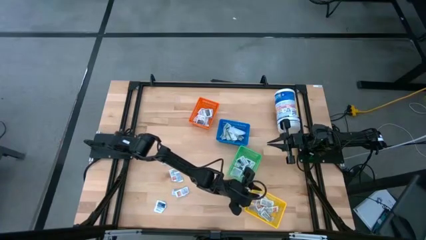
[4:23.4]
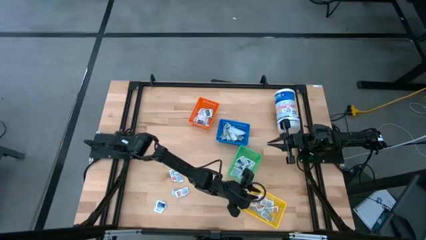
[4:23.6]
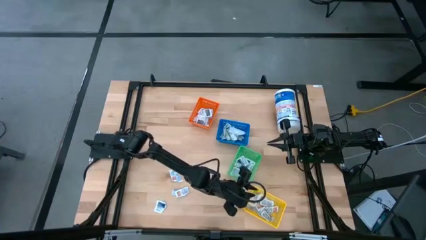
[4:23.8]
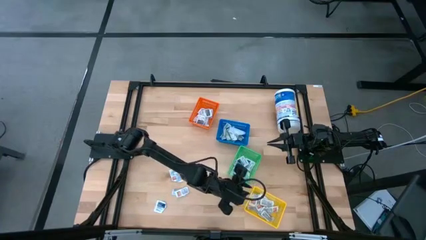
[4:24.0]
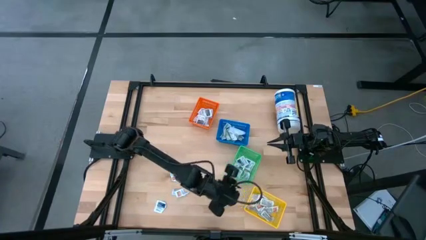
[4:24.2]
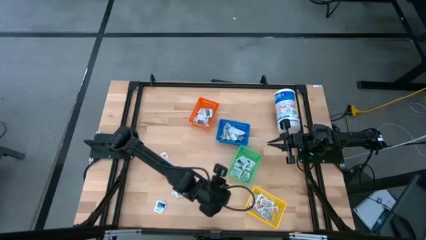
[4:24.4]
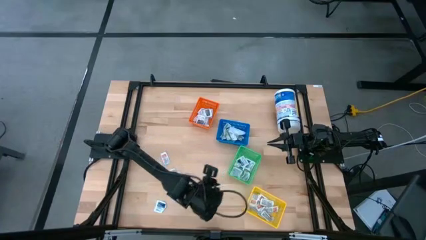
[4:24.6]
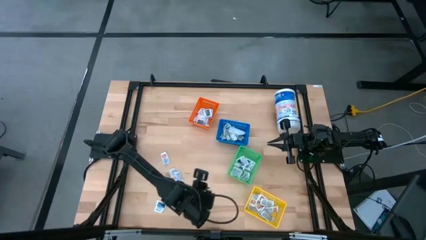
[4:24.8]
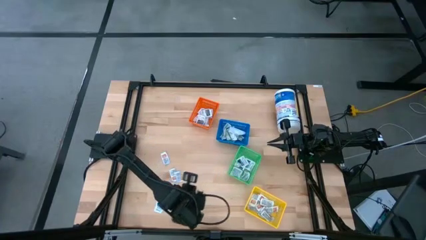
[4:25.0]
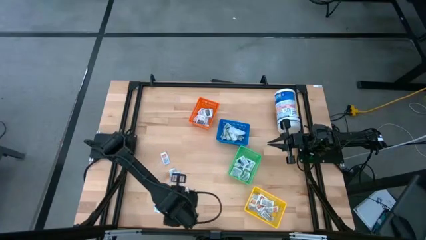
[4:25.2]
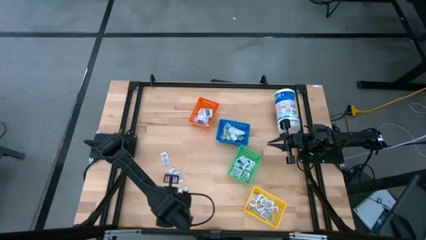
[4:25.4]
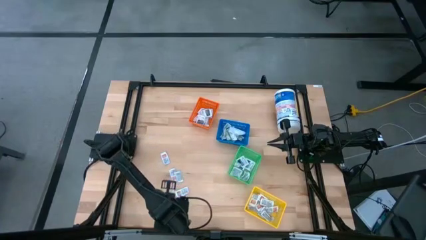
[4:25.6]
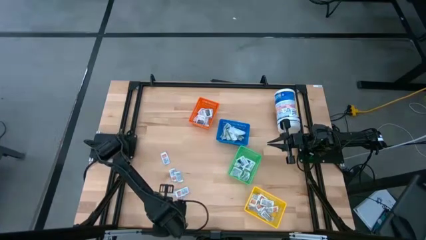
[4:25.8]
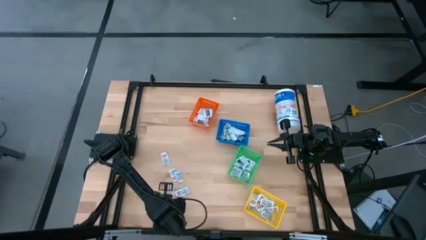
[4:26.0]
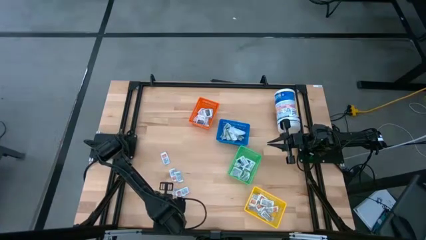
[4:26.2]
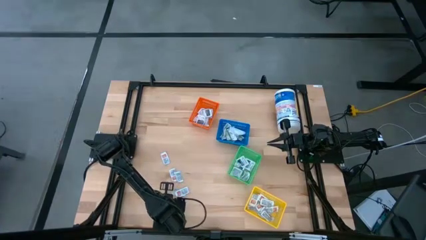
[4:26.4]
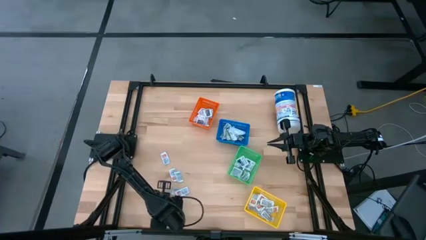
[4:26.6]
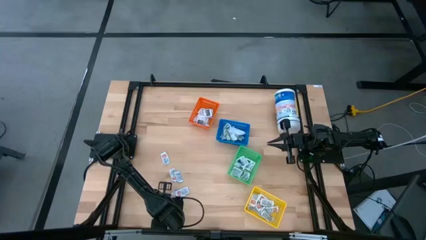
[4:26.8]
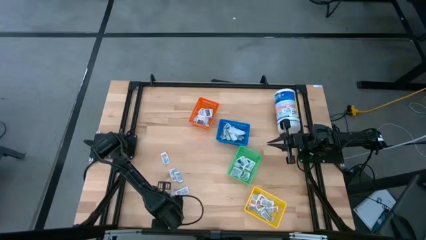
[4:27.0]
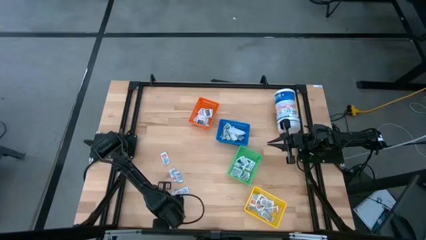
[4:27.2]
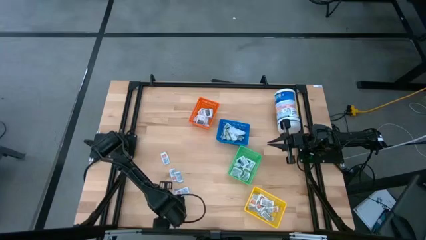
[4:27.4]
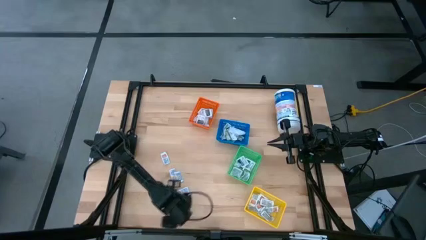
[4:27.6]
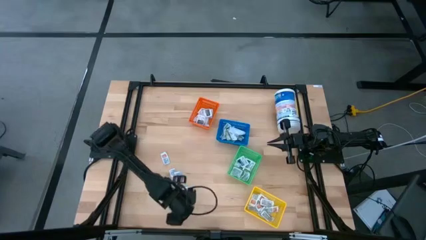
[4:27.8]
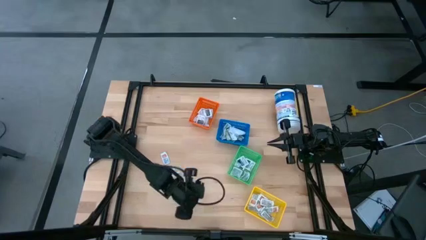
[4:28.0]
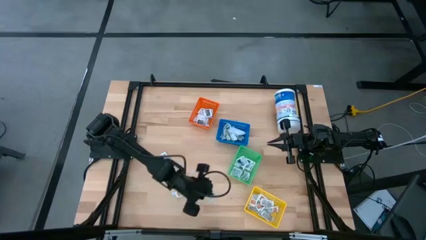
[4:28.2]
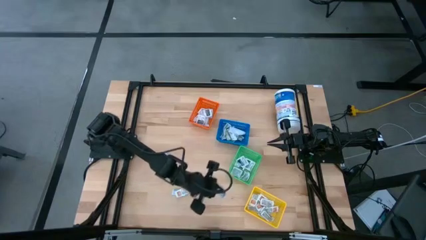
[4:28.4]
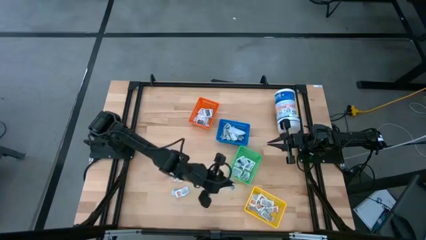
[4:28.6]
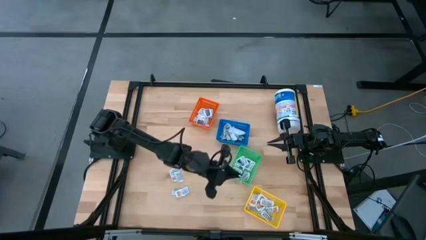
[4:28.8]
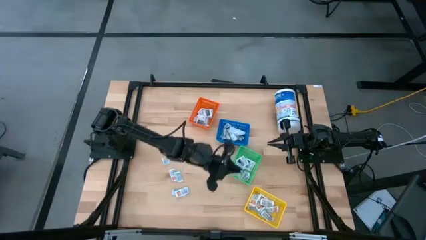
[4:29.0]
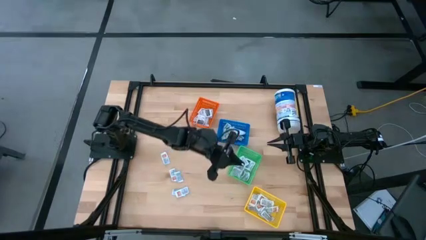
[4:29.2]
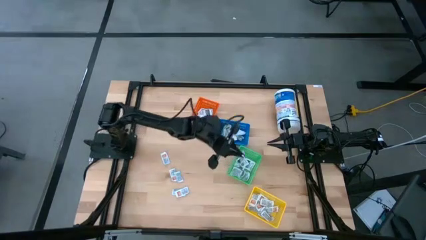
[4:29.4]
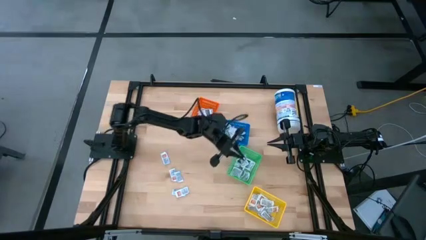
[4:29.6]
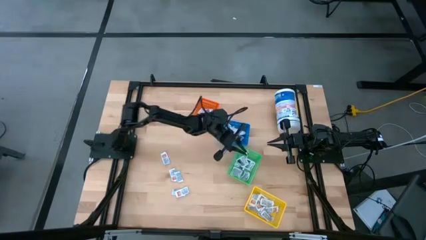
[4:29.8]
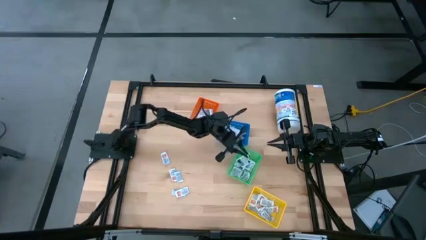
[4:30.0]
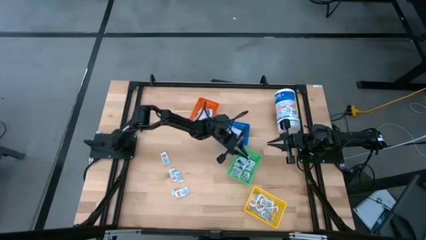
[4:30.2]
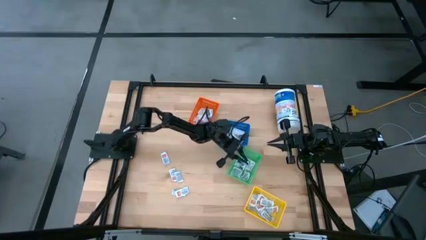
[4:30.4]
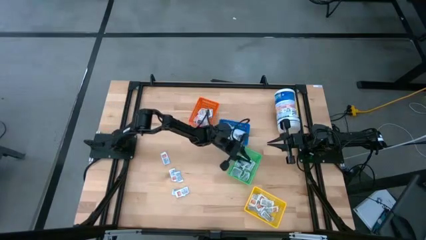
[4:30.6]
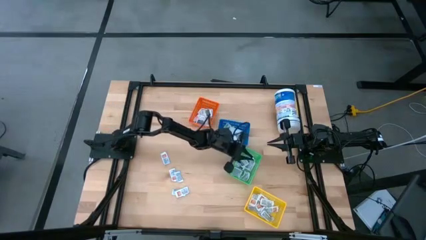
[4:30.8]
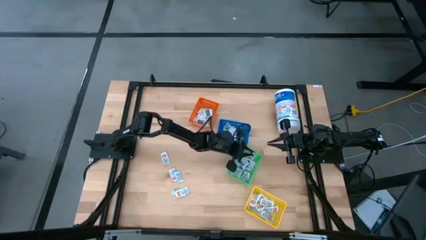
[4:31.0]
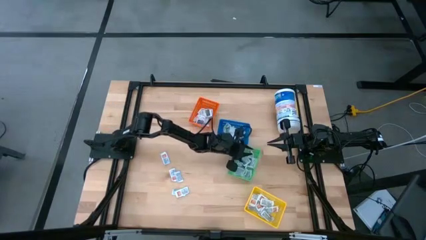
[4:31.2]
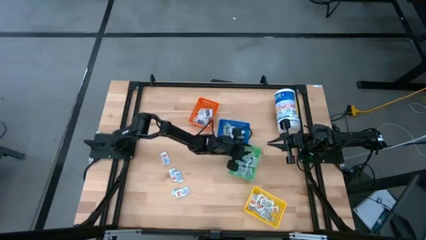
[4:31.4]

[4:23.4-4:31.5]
Task: Pick & Place First Aid Supplies
Put the blue alcohol pad into the green basket

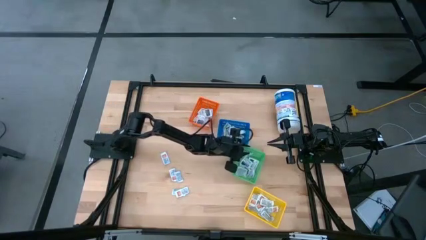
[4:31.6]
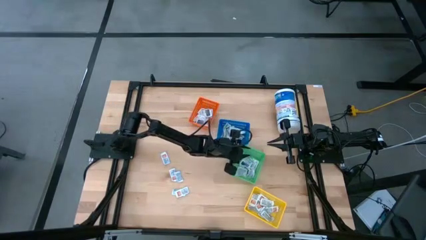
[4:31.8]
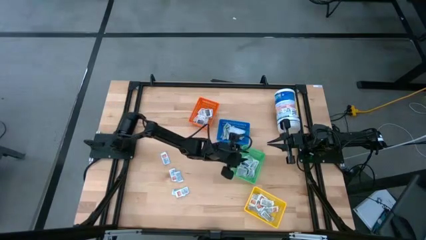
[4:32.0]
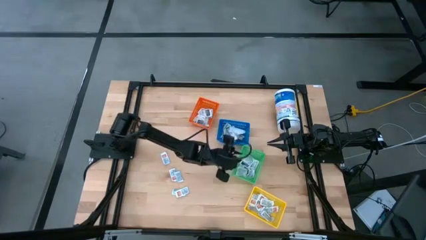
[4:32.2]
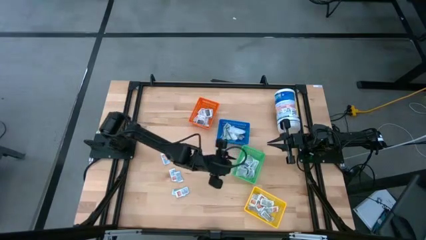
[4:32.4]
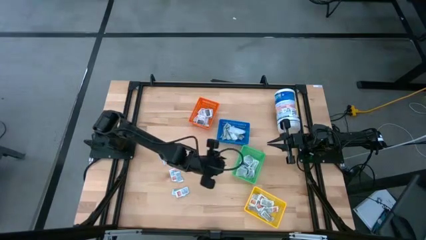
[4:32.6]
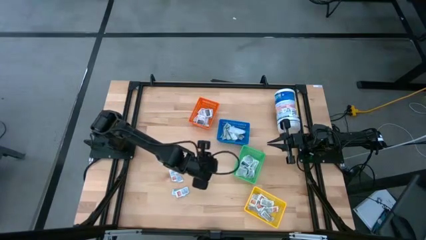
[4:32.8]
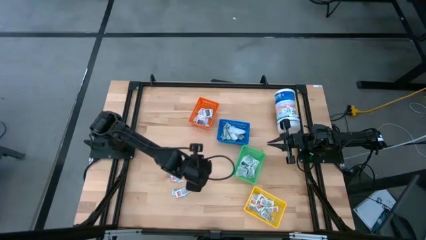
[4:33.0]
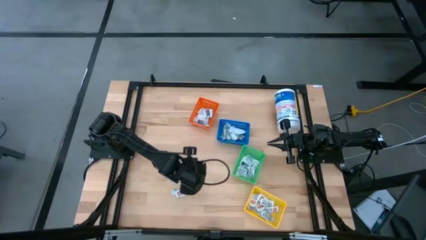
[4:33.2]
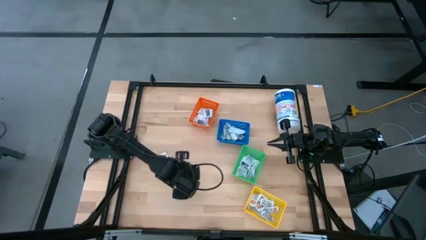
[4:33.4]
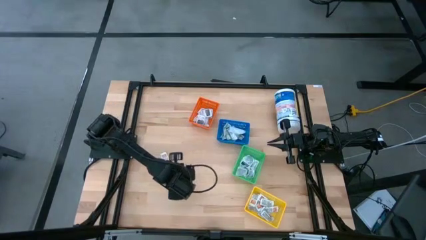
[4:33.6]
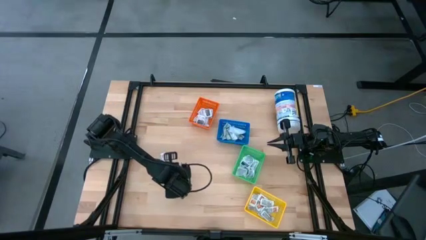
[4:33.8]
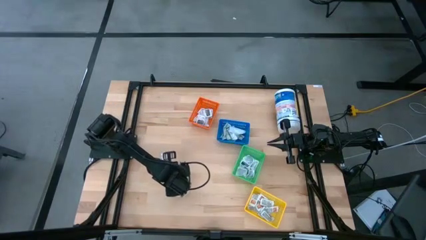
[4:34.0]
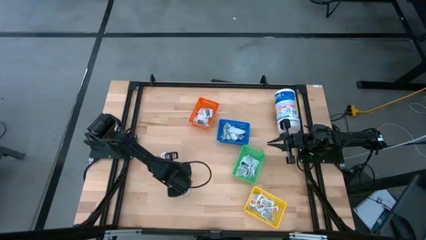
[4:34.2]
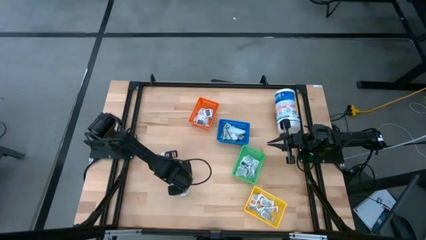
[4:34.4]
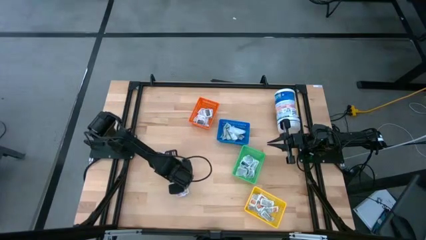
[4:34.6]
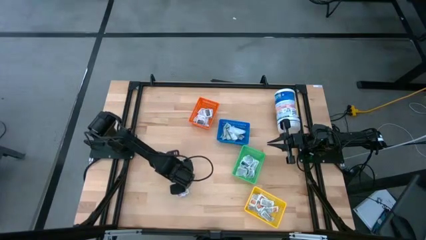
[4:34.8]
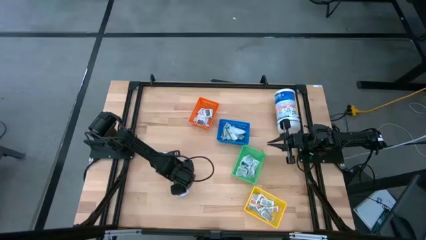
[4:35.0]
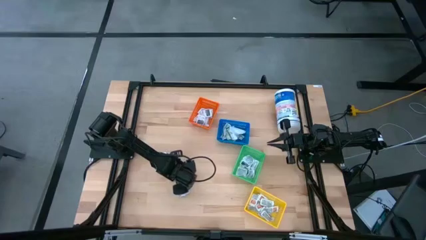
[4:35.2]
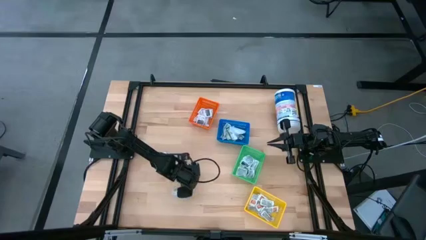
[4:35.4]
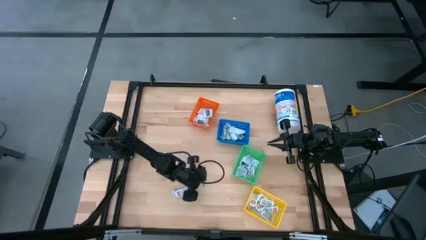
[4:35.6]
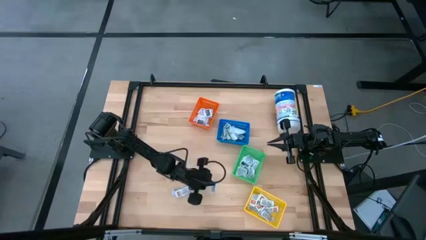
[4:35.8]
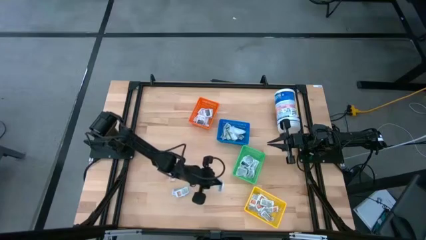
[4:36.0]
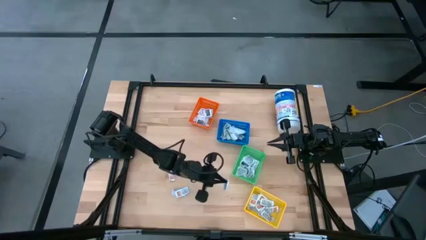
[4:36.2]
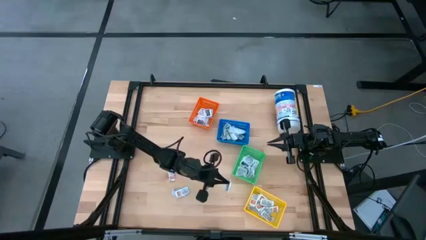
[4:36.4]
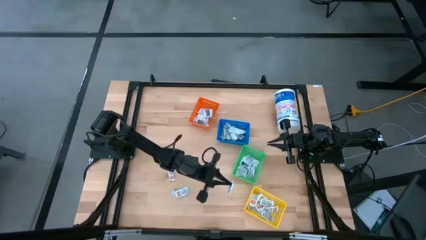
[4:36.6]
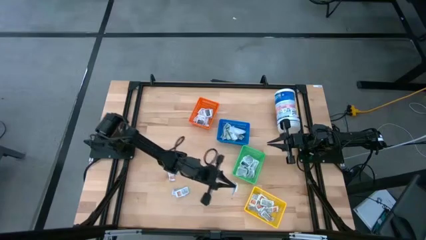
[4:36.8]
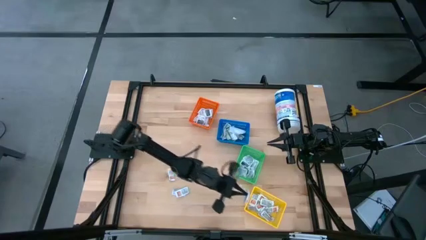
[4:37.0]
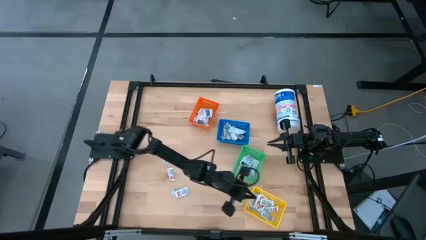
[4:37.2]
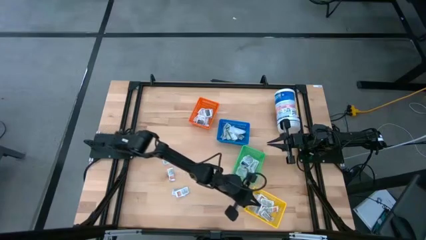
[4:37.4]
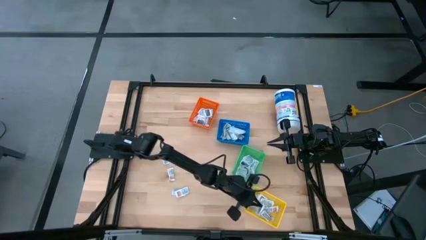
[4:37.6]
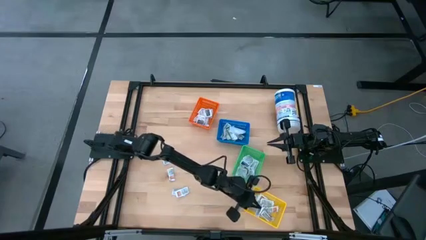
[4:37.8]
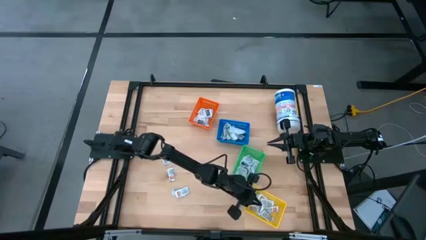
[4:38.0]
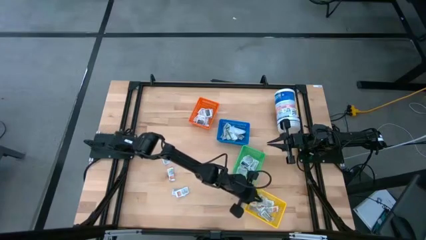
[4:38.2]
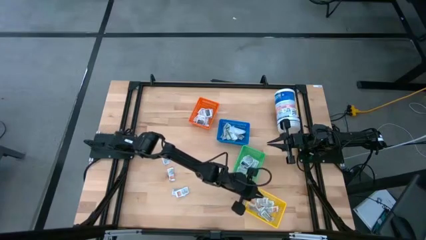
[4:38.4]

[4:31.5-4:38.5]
Put the orange ointment pack into the yellow basket

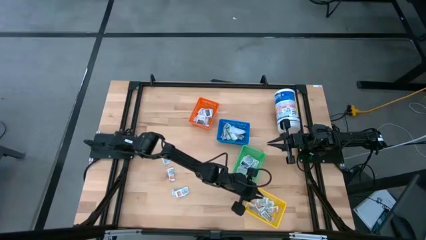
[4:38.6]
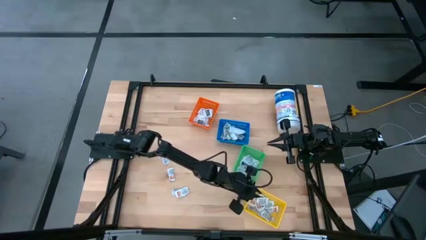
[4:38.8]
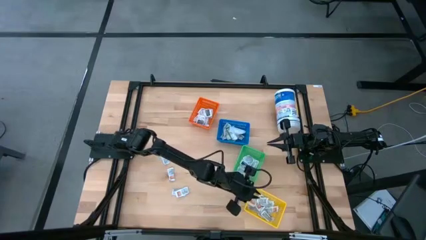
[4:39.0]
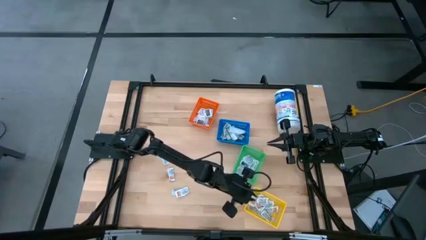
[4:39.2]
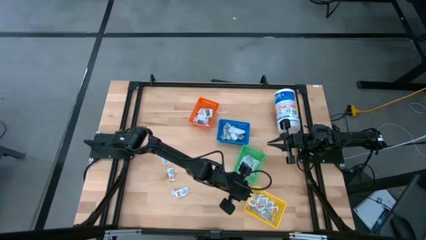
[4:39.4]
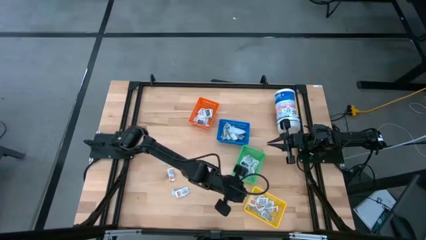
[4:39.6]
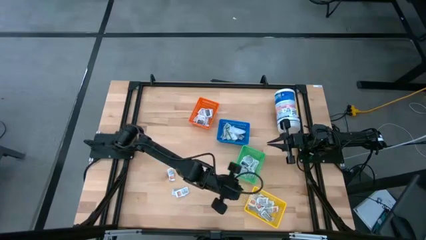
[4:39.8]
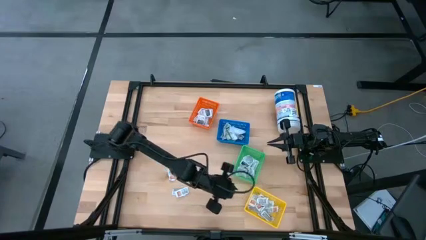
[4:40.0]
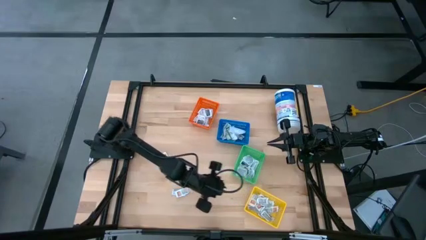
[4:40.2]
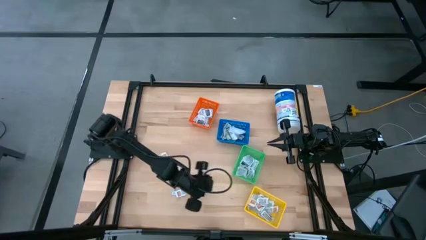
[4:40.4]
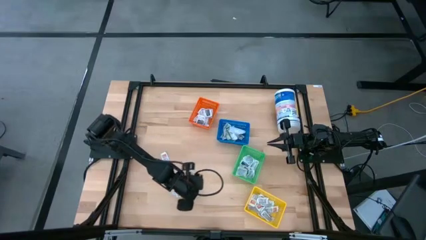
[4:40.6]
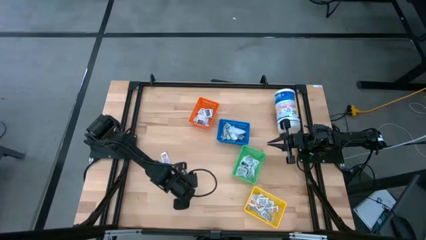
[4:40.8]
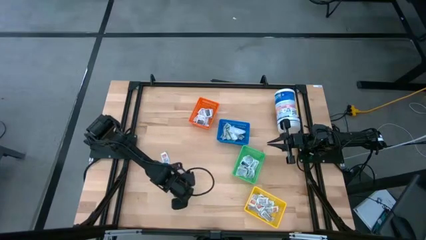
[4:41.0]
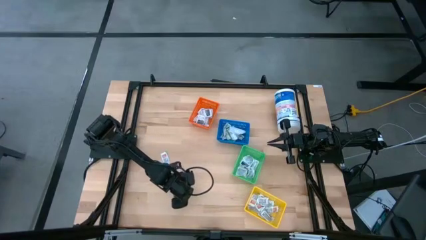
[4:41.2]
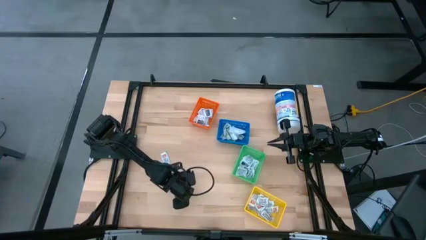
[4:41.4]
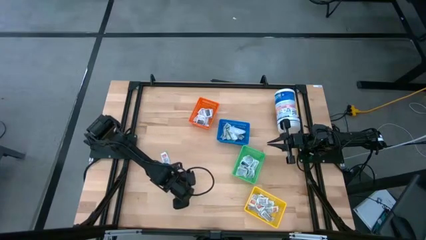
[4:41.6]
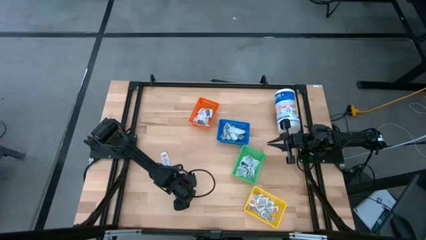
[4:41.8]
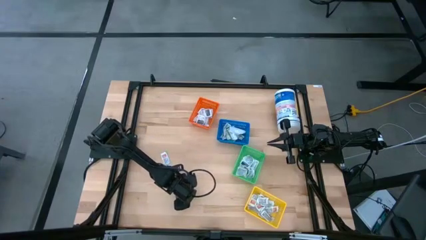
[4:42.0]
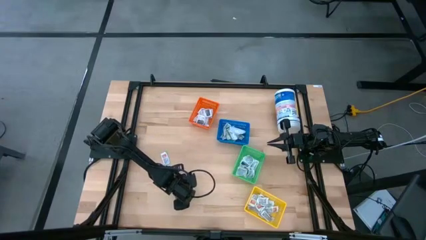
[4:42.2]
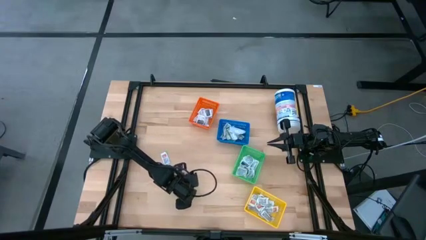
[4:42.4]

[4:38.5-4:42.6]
Put the orange ointment pack into the yellow basket
